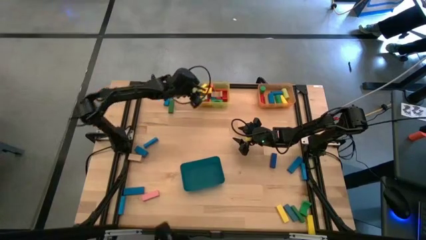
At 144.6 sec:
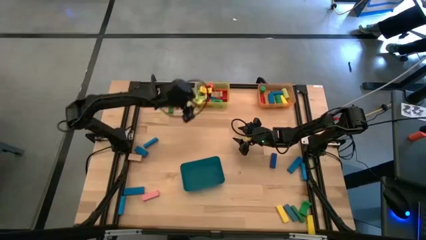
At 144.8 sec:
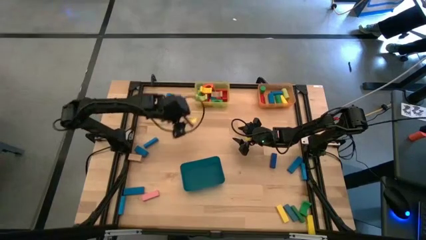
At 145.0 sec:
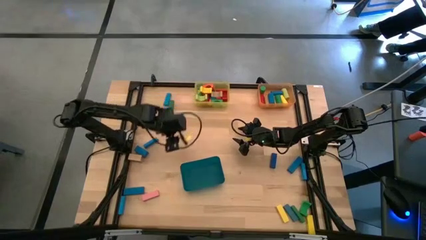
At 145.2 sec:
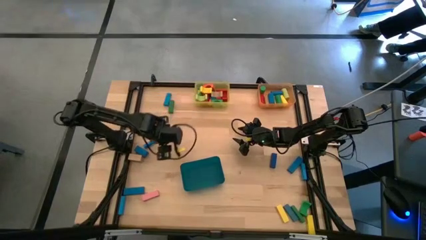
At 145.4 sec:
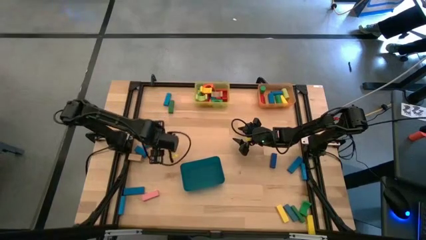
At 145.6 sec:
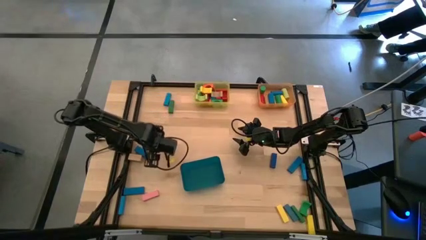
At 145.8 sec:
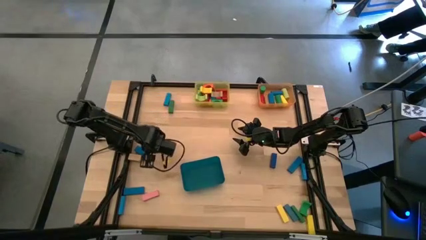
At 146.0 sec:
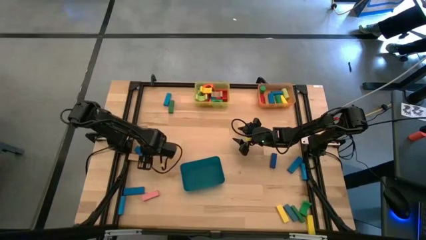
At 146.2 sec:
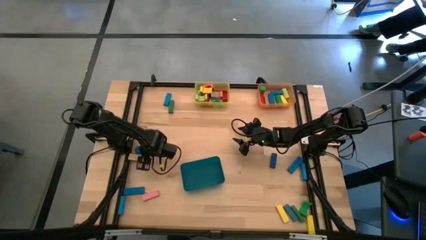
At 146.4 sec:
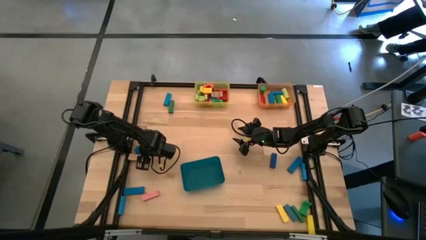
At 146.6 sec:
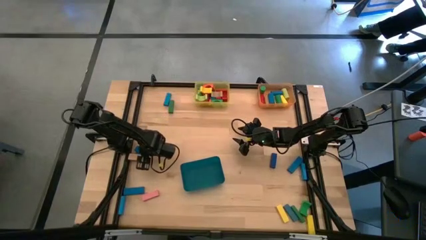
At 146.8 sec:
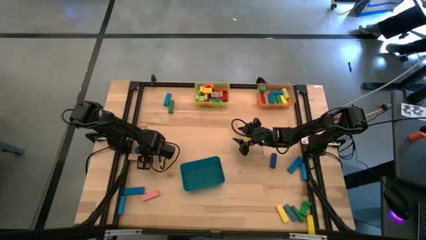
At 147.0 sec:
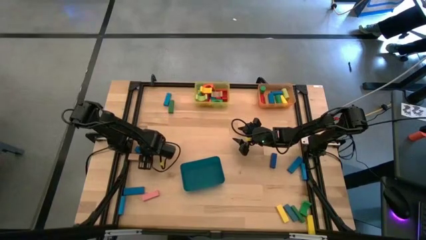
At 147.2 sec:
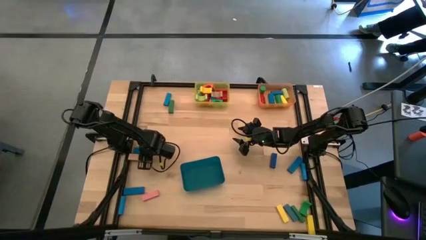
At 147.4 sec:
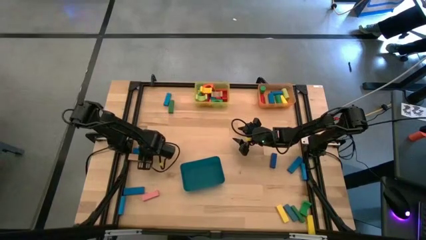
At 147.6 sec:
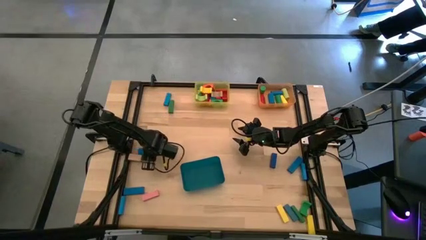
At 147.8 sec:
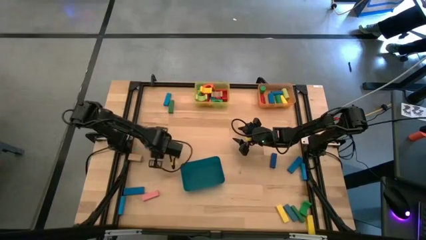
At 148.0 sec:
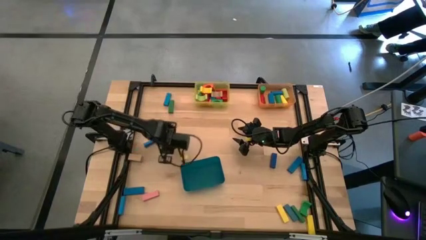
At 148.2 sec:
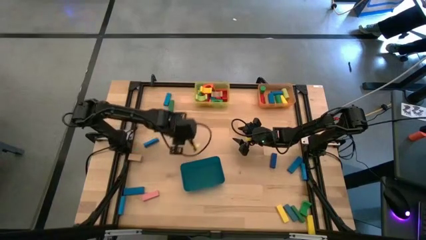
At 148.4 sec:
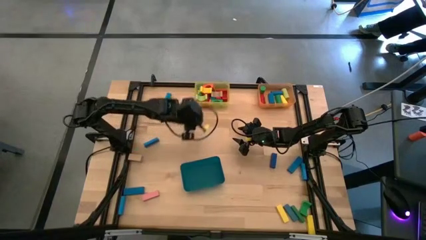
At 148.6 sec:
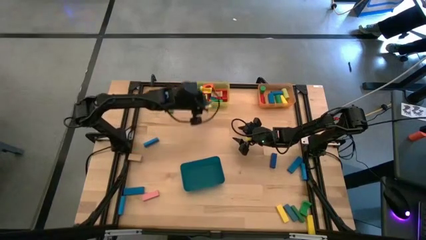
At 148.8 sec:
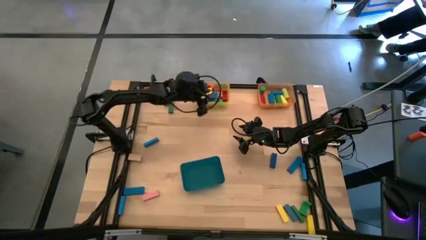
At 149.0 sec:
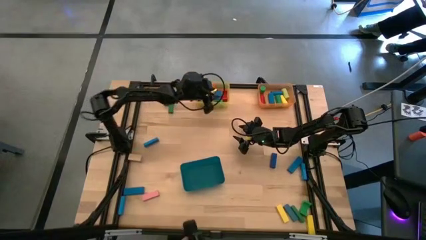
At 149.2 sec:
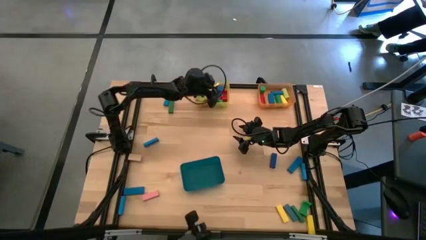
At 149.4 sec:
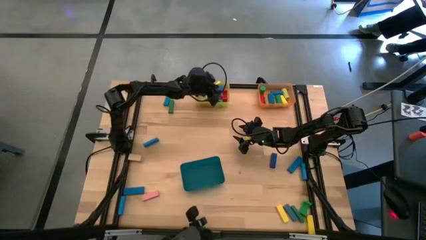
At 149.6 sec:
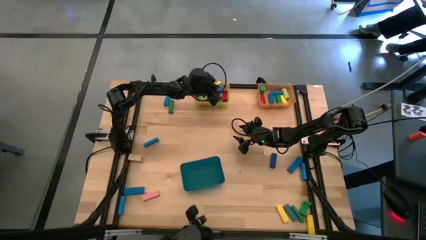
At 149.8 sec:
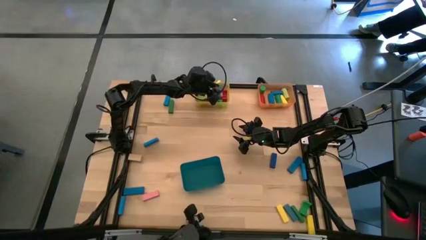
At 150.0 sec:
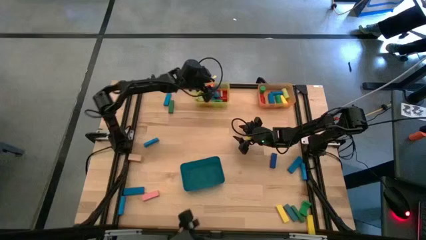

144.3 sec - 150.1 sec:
Task: Sort blocks by size
Put the blue arch block into the yellow bin

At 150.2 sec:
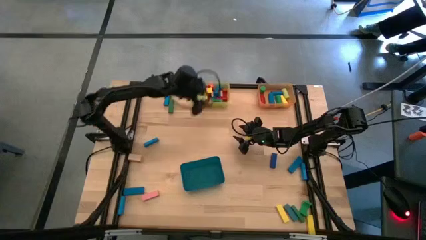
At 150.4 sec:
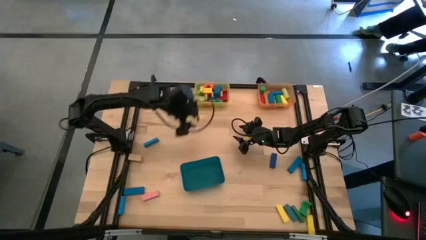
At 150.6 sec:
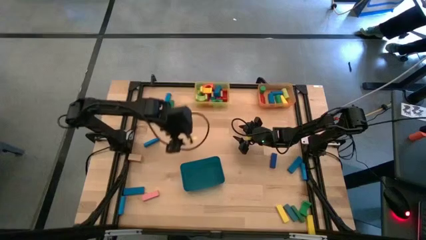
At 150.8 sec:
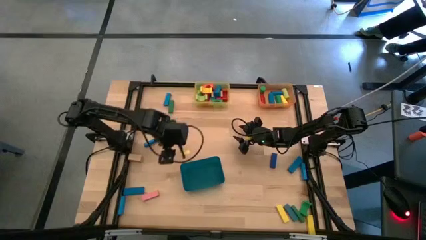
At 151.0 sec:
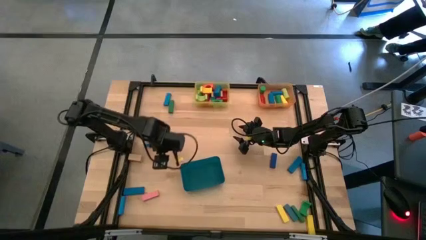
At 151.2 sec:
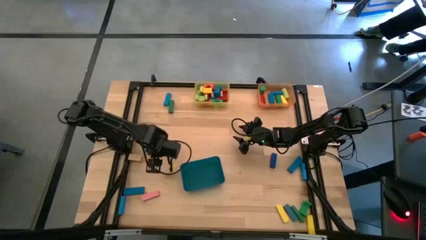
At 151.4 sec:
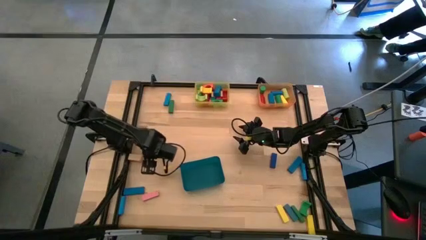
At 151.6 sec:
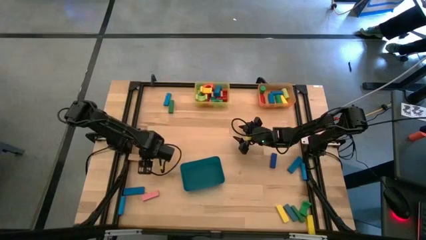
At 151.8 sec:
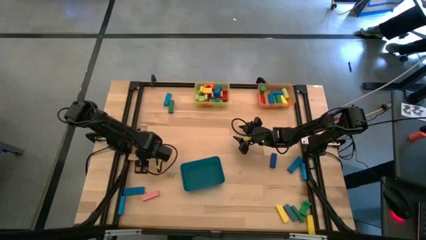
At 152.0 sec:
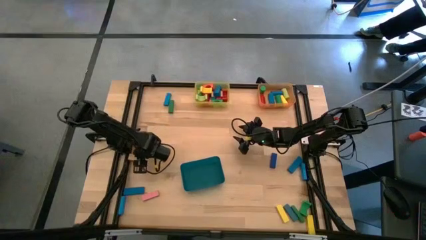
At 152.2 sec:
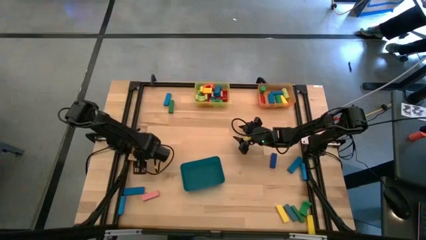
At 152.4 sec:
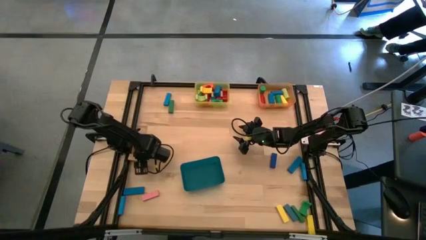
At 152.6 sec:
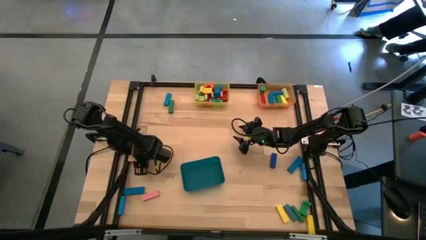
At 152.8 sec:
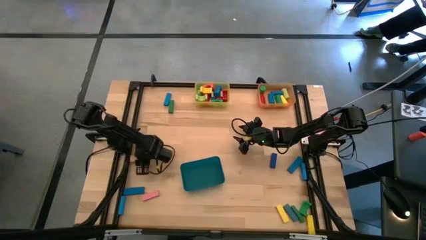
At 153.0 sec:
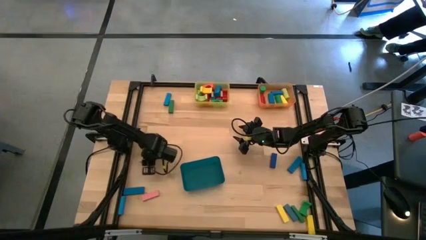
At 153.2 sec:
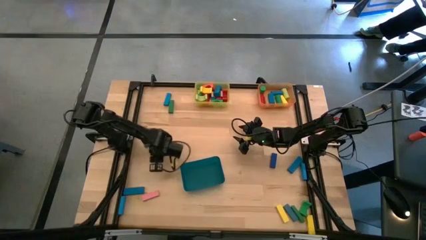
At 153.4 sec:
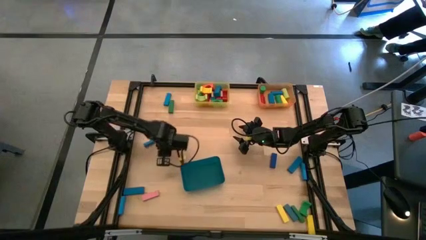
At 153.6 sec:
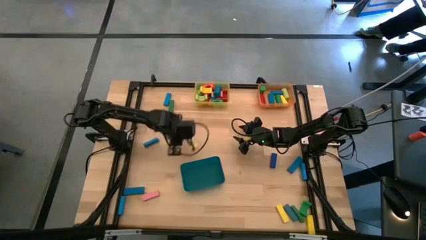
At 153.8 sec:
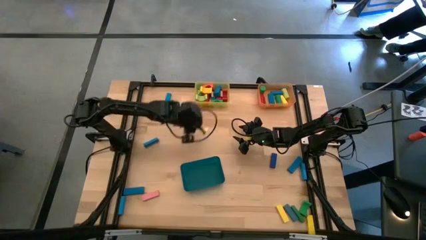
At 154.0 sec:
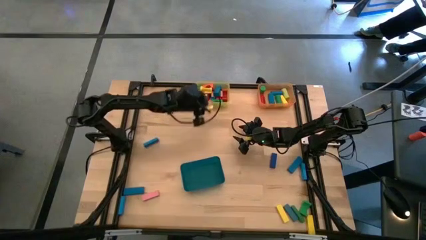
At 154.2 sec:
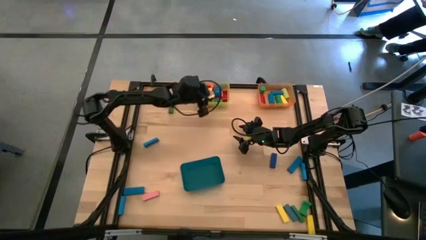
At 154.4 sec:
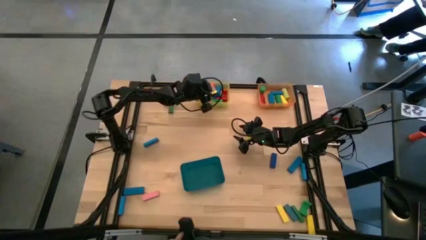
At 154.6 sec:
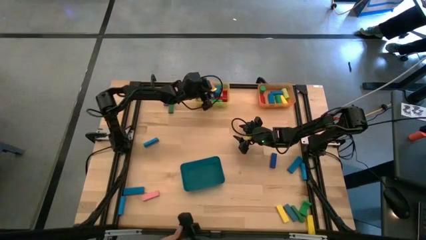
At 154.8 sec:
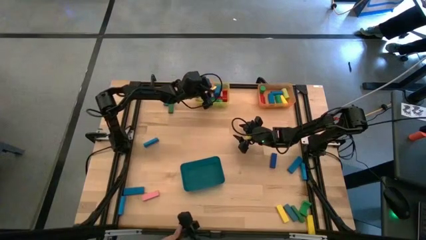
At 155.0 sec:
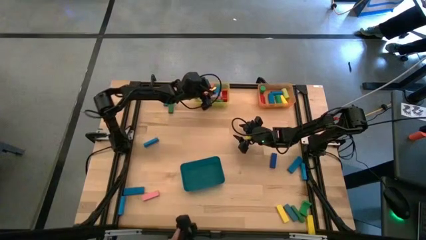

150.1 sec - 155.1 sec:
Put the brown arch block into the yellow bin

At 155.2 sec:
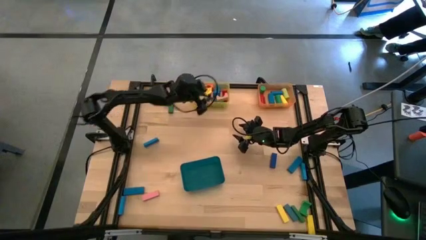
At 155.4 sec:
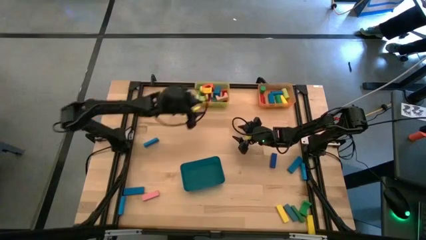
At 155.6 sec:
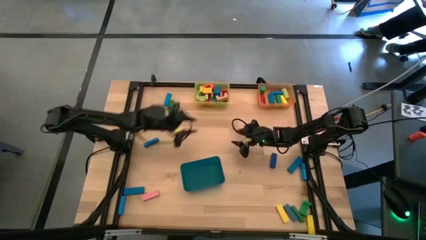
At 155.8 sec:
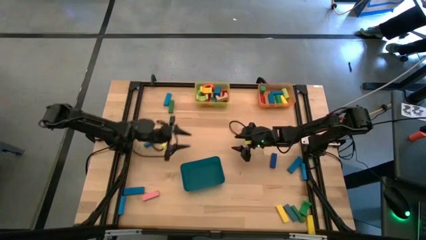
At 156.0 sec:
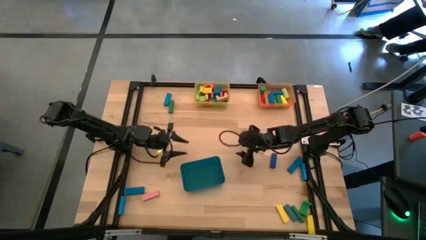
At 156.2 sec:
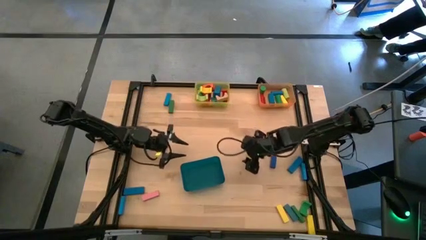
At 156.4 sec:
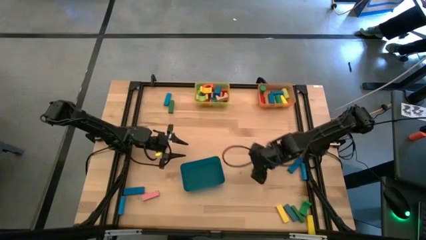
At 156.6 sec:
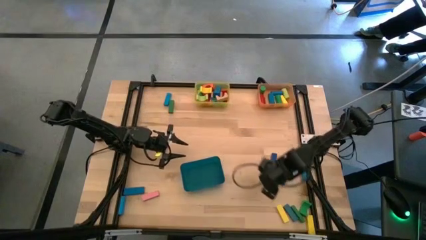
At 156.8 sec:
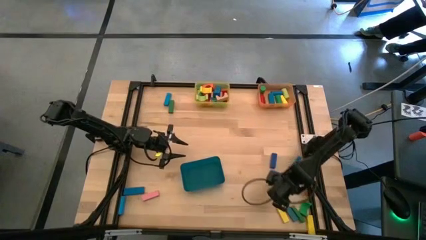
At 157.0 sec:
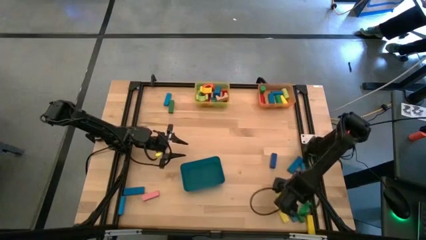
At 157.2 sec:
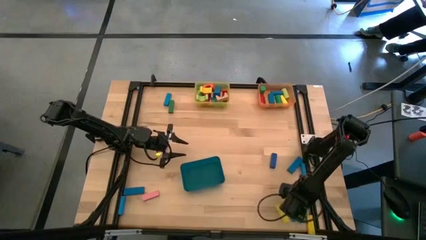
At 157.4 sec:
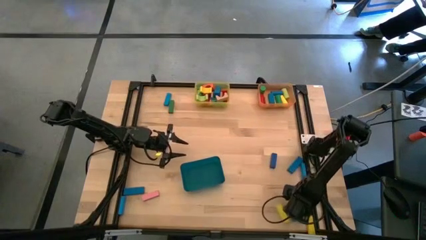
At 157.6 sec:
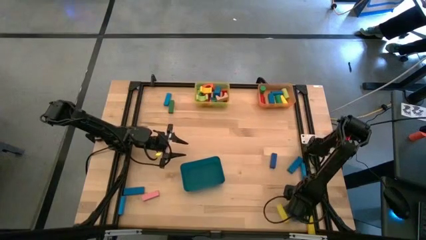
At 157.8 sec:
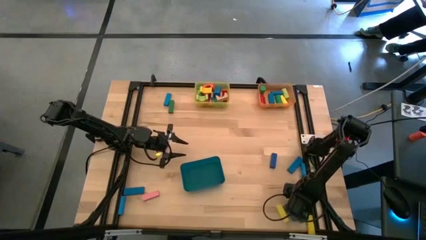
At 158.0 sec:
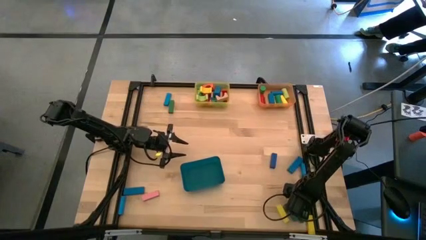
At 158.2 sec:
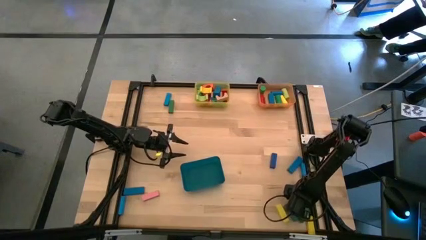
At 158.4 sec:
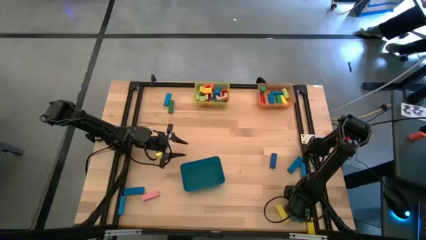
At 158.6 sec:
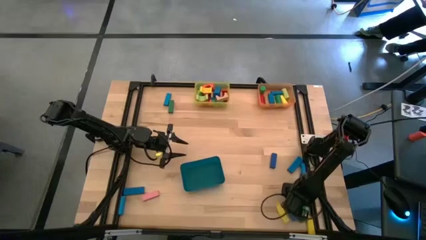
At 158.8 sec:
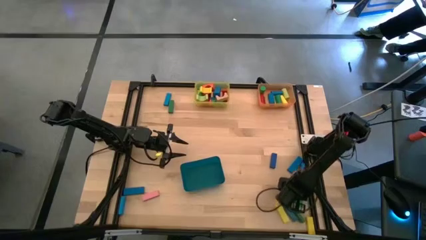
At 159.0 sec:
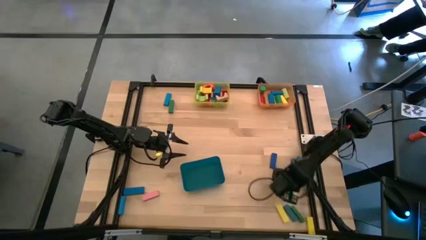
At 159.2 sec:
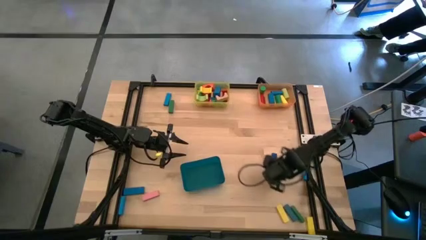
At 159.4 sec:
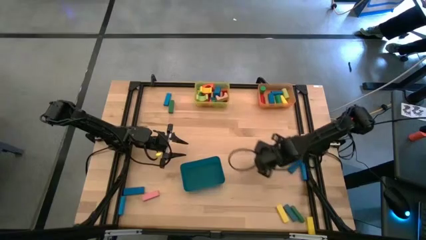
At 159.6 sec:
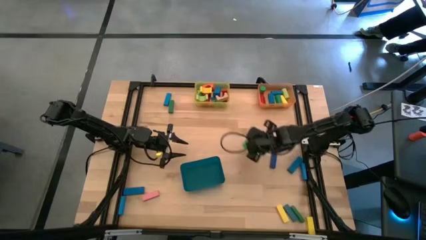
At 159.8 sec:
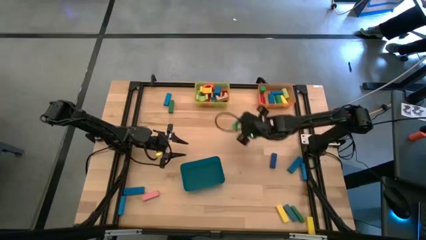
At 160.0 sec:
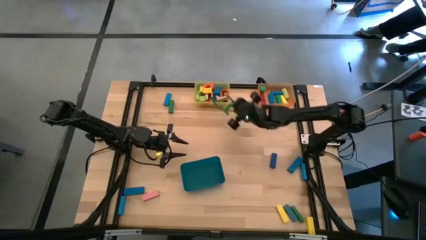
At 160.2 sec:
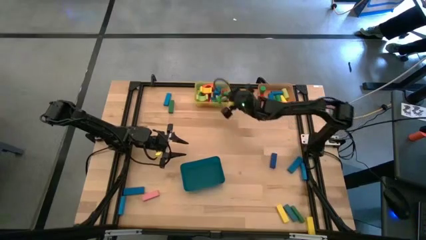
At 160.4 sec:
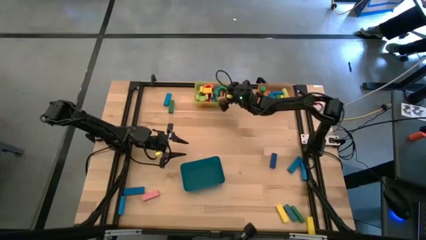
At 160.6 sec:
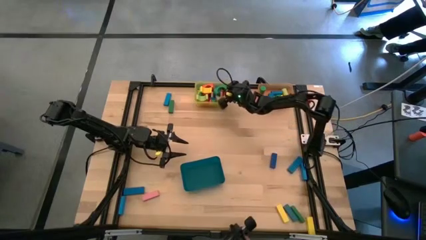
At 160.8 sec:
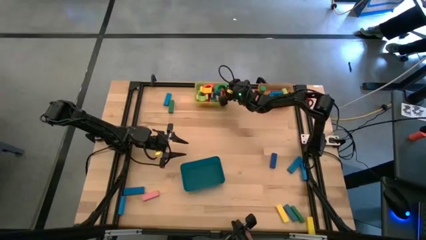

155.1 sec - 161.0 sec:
Put the green arch block into the yellow bin
